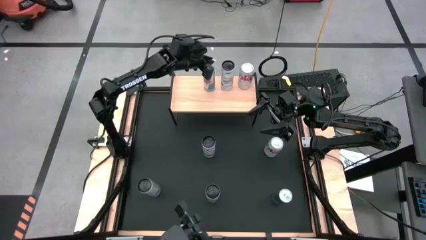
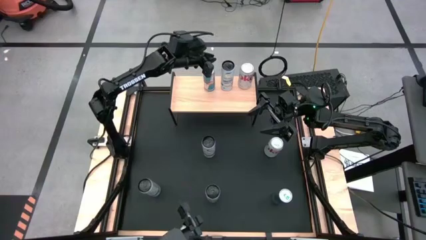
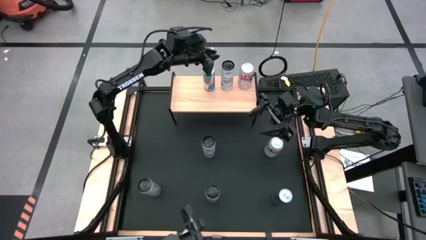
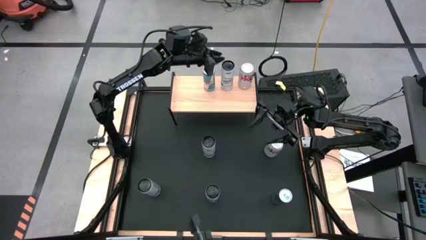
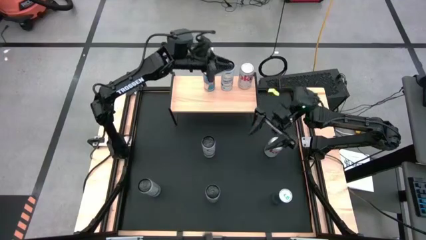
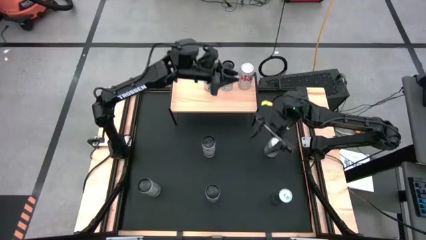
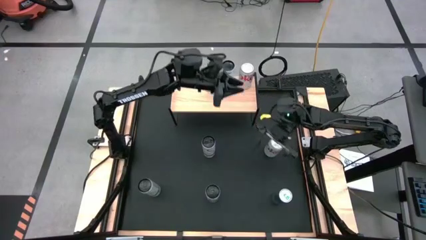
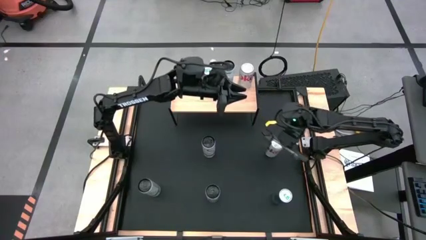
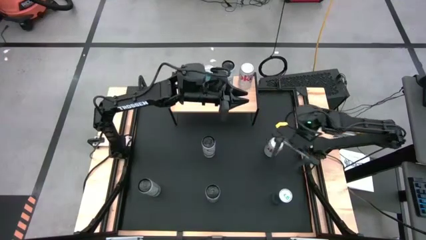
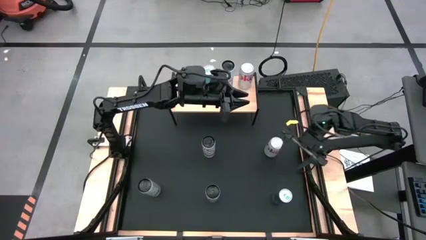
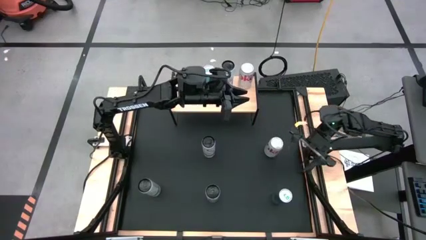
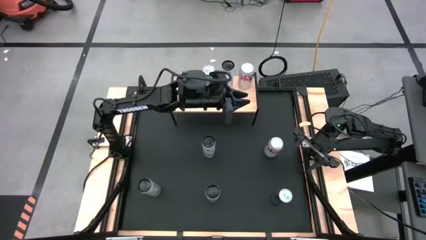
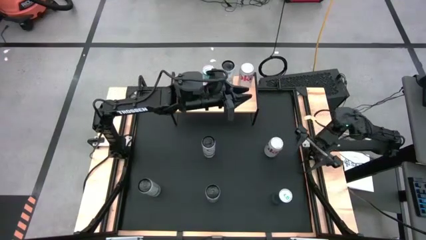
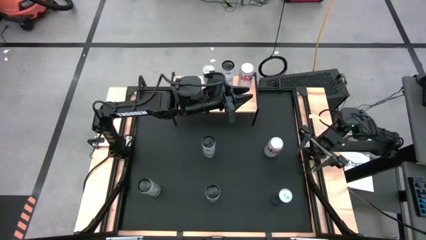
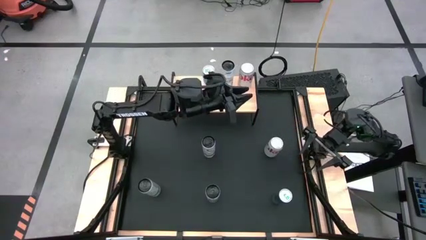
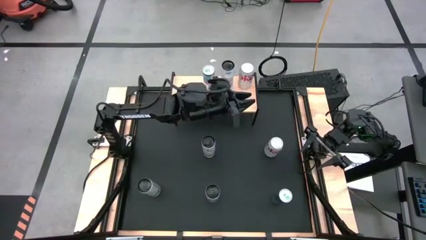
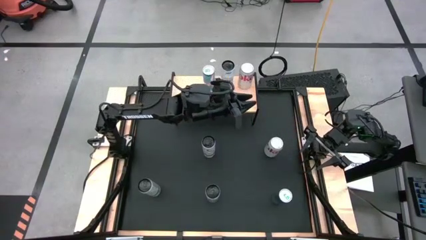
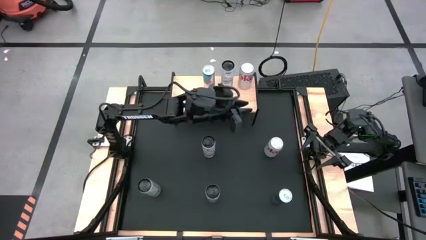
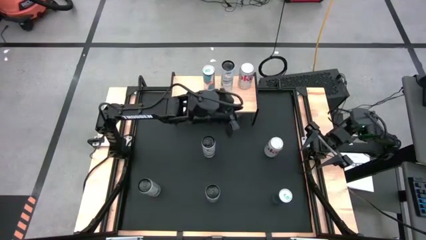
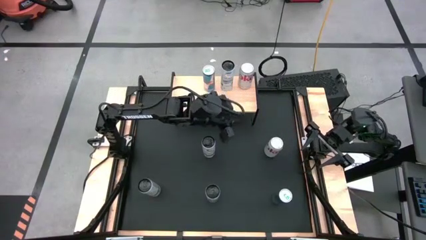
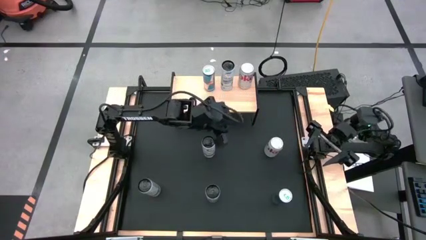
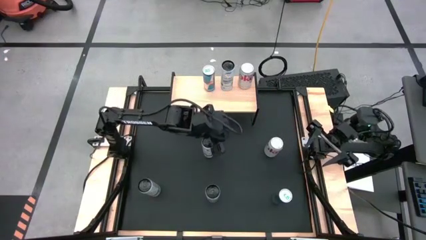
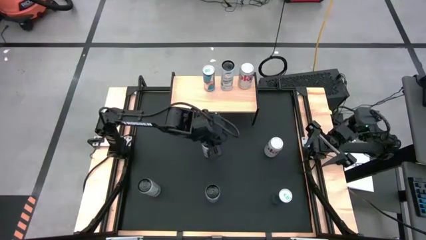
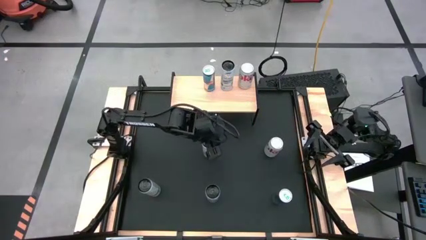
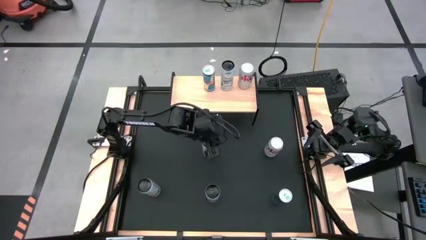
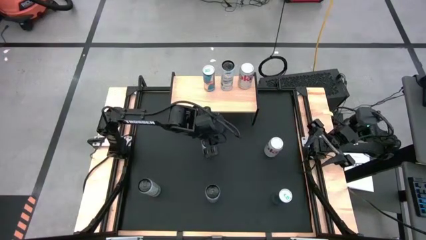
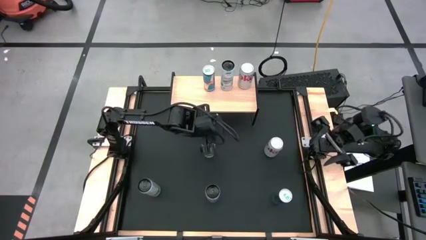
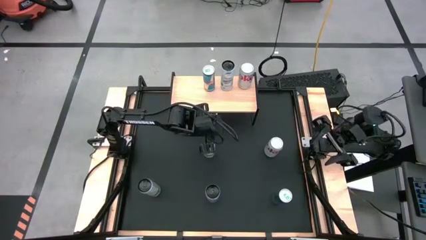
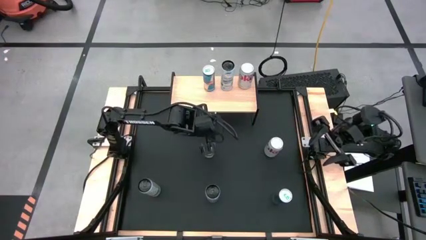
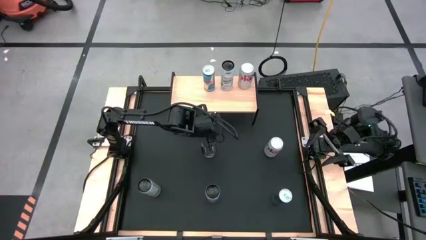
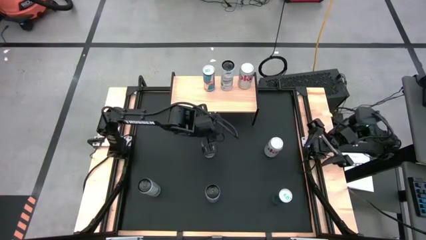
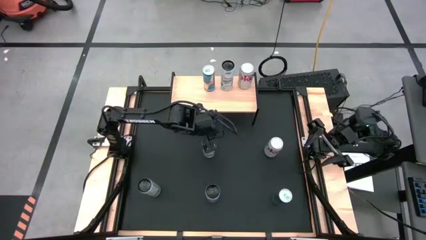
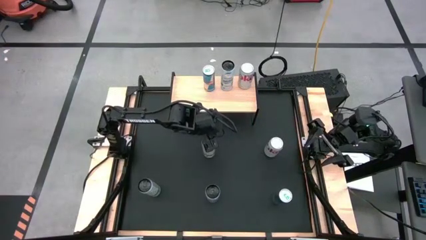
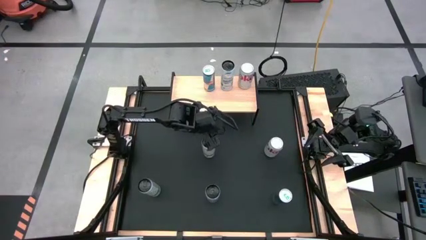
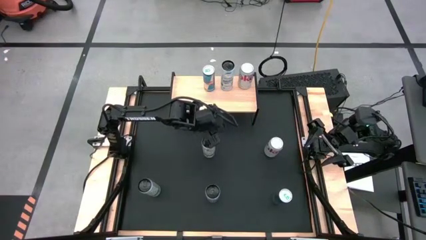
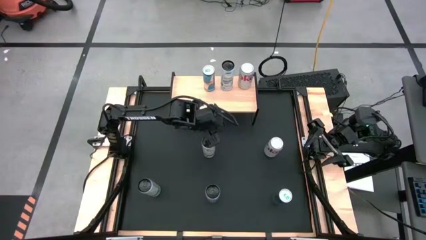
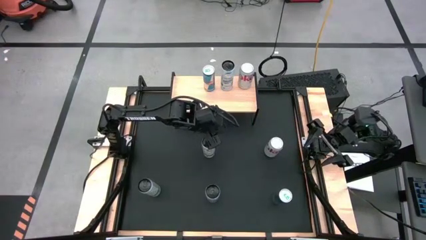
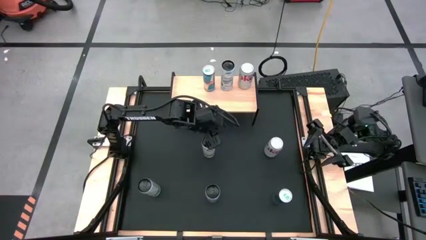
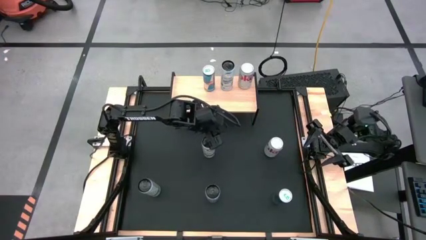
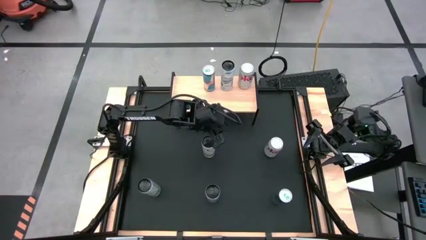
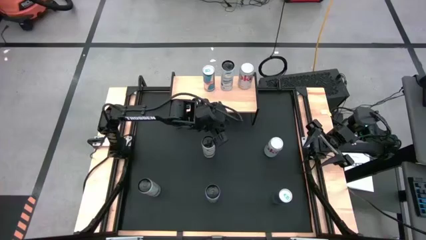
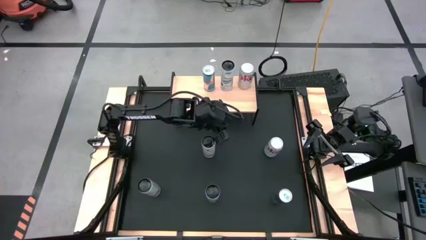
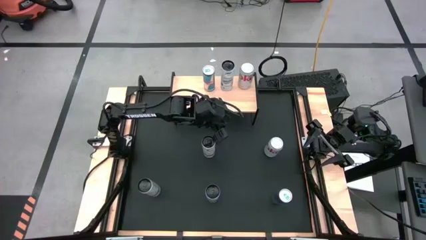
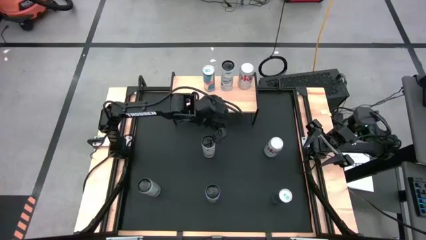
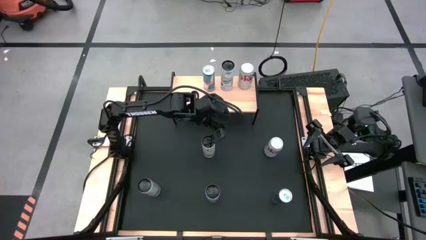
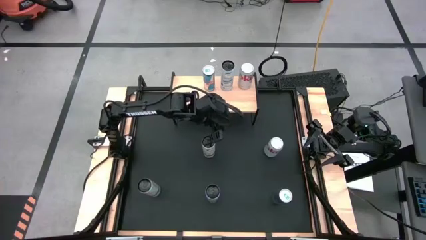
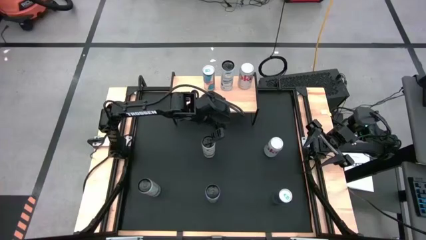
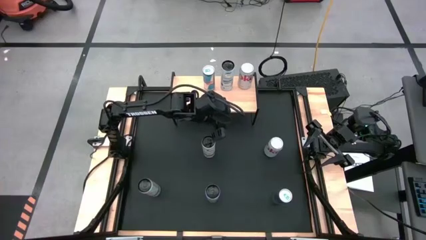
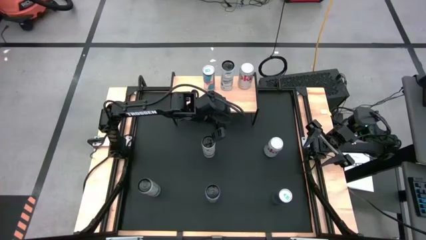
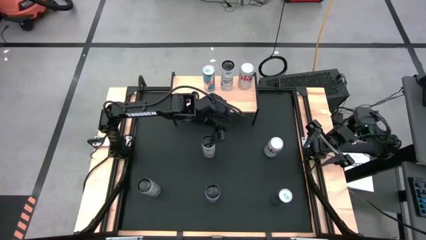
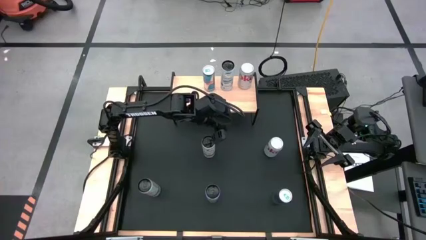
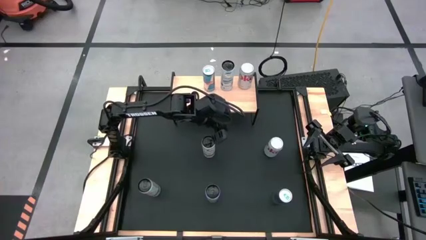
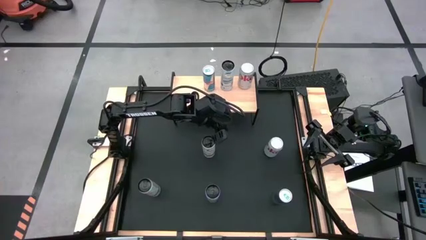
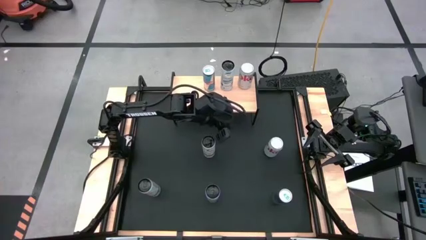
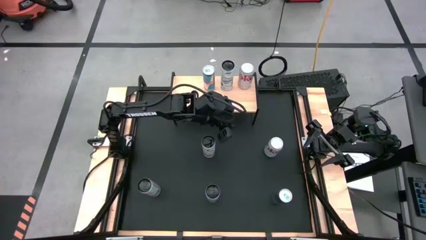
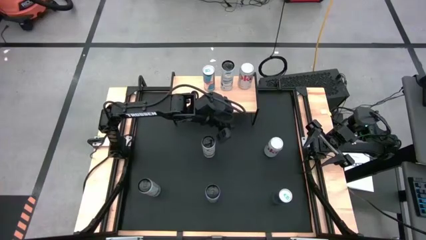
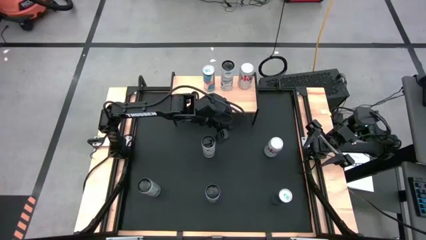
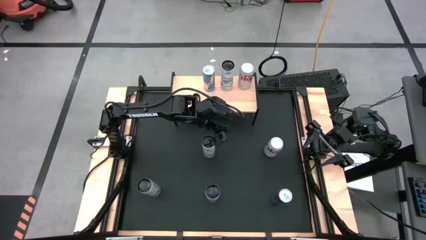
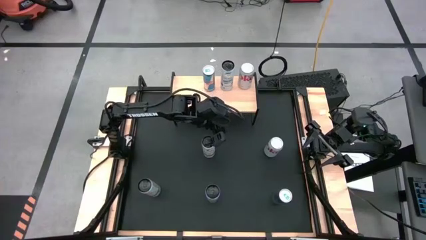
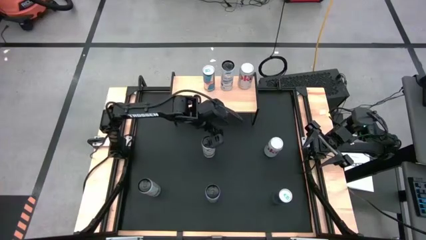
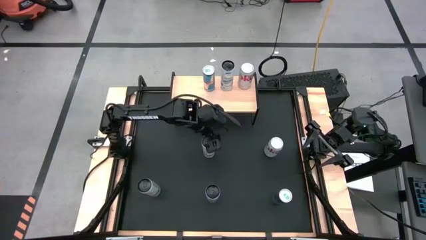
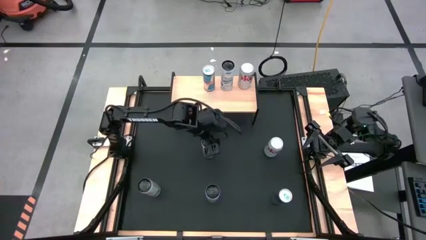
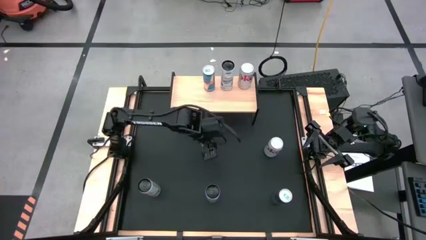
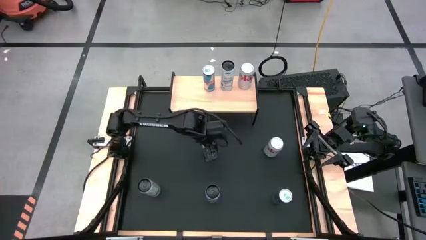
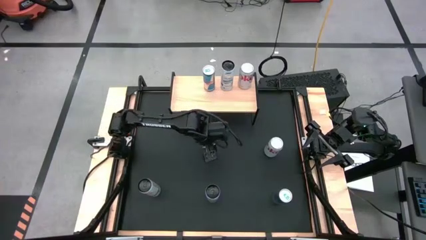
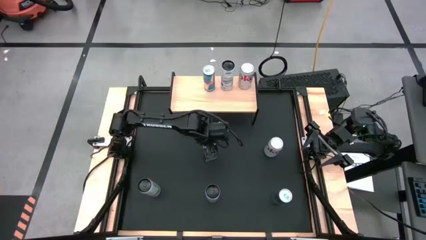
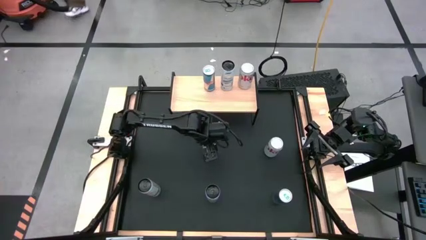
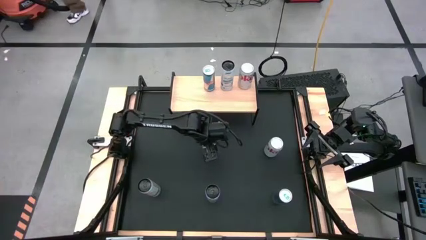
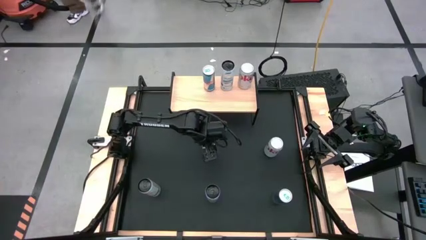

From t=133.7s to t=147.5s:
Task: Place canned beverage on shelf
Put the top right white and black soda can on the shelf

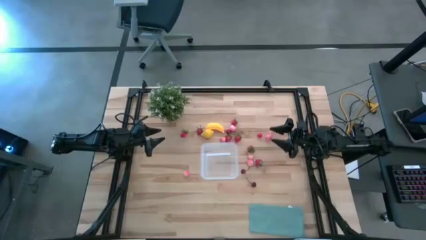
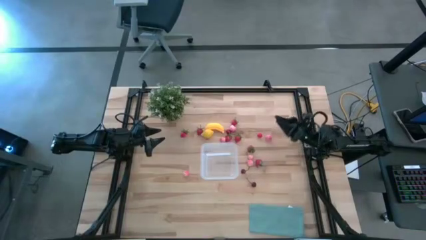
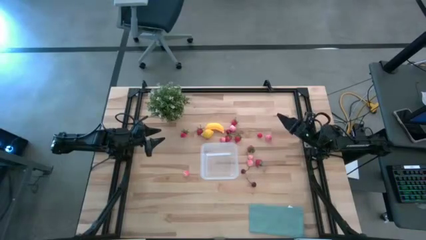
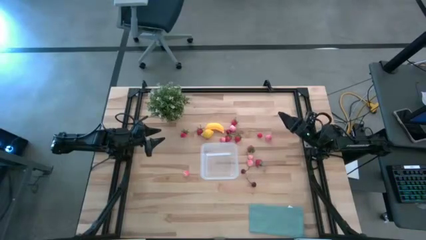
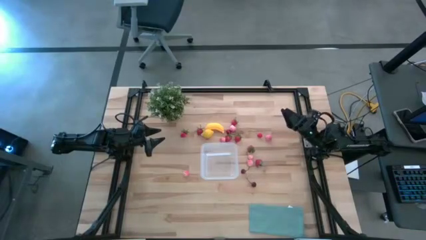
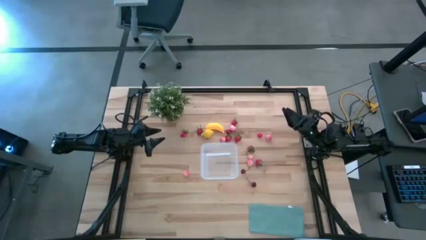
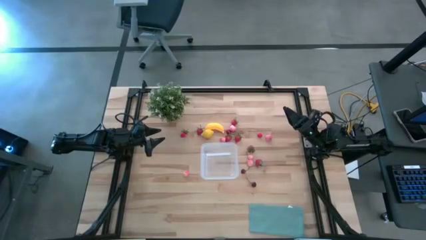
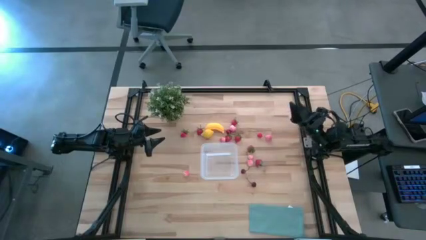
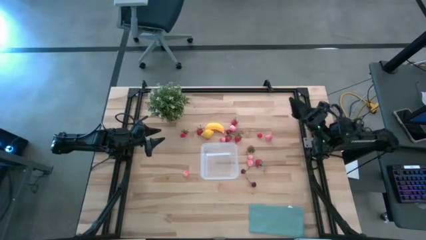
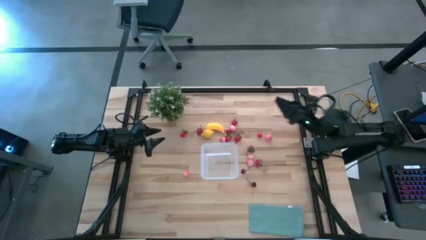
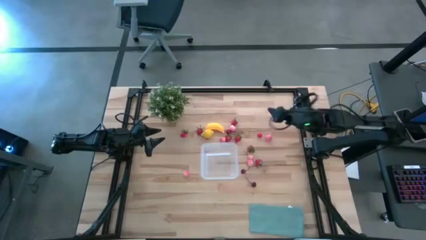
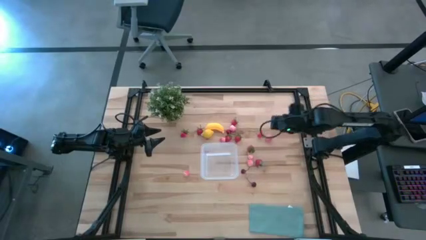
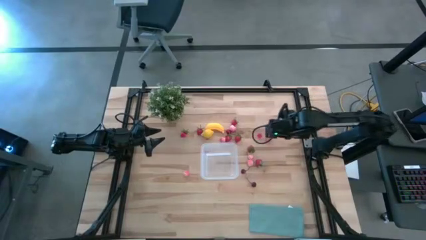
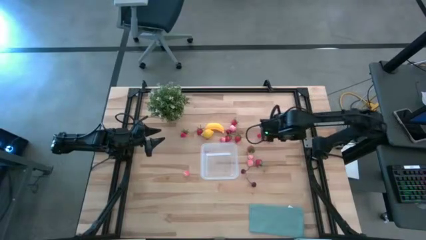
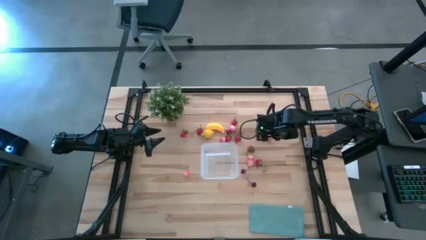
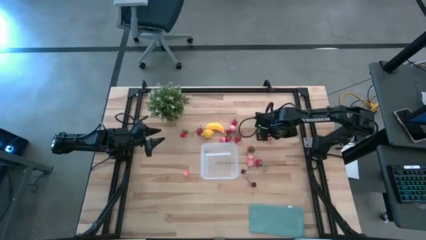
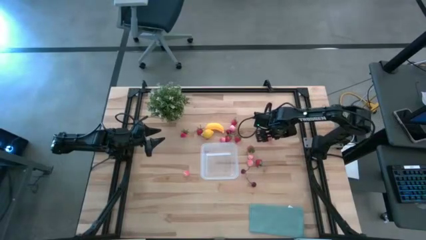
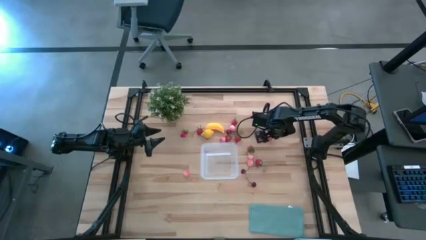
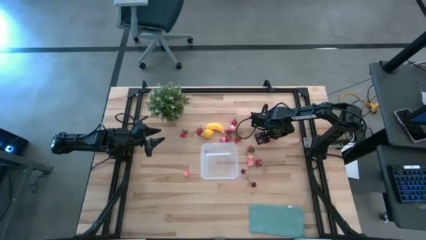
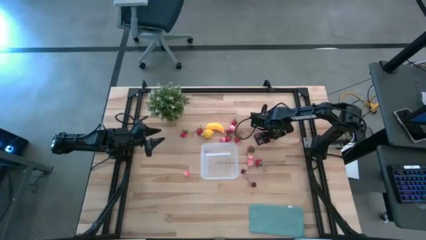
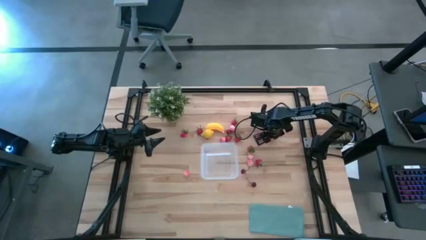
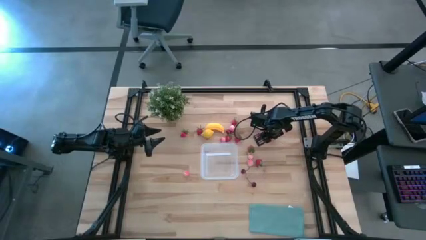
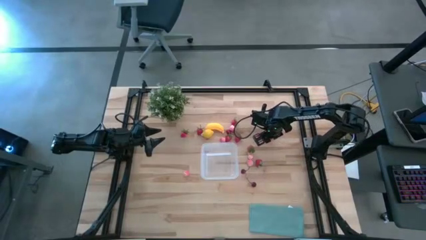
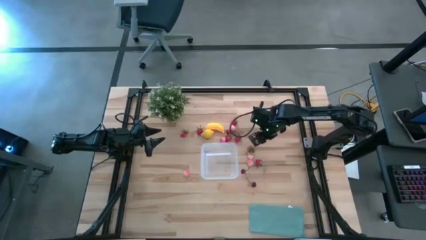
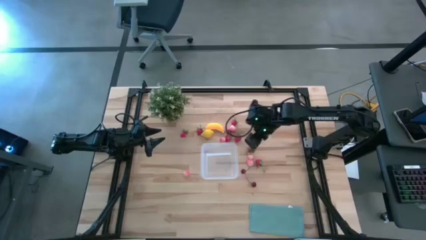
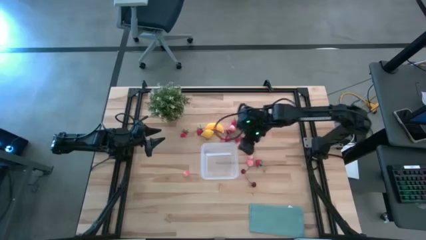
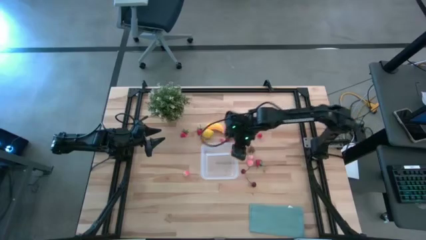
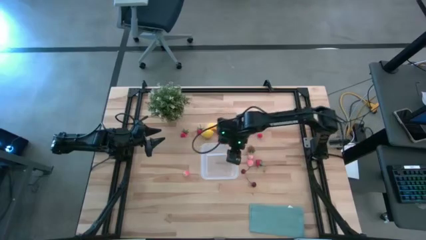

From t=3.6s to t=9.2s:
Task: Pick and placing Produce into tupperware
Put the pink peach into the transparent container
